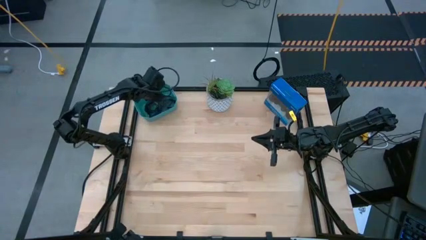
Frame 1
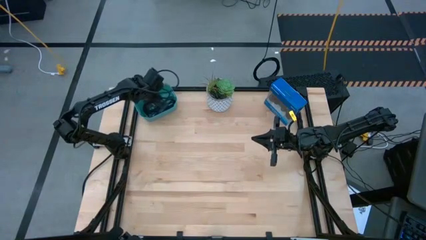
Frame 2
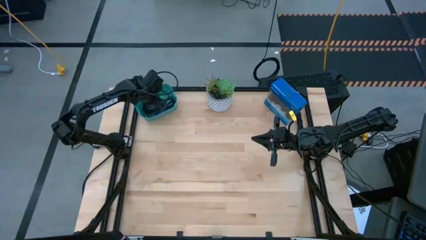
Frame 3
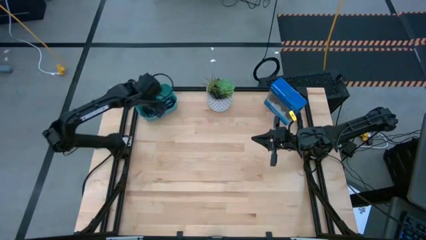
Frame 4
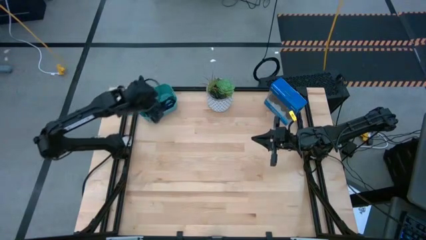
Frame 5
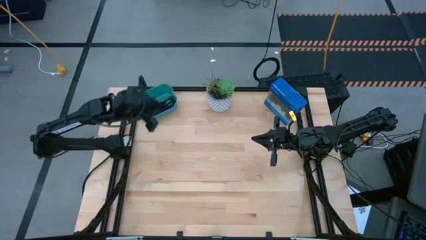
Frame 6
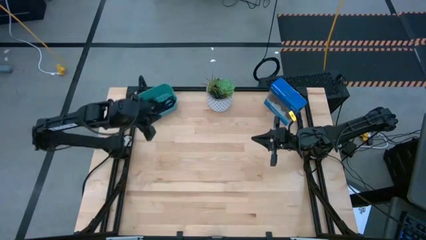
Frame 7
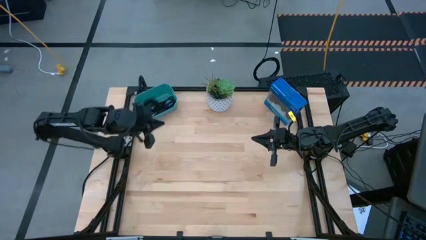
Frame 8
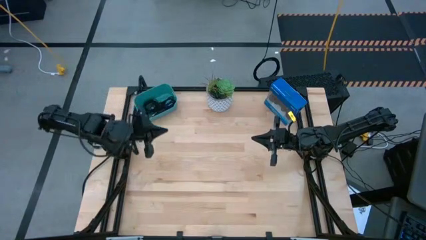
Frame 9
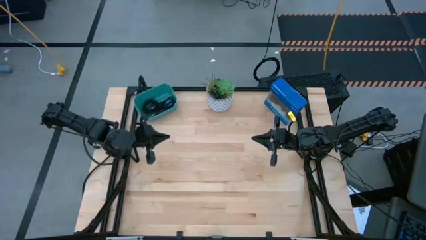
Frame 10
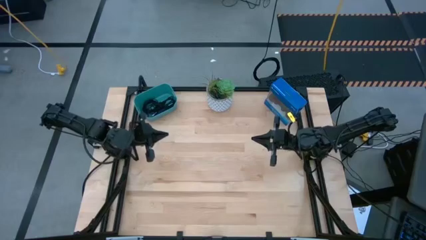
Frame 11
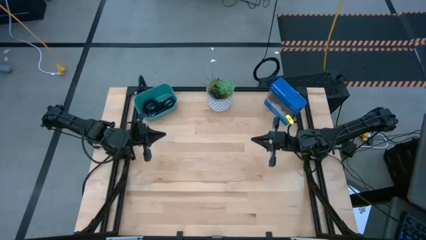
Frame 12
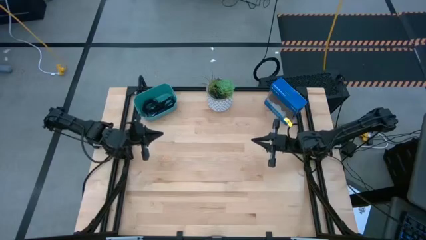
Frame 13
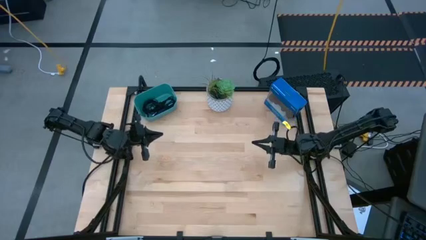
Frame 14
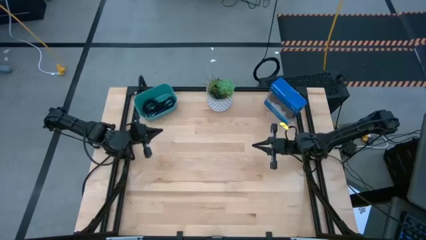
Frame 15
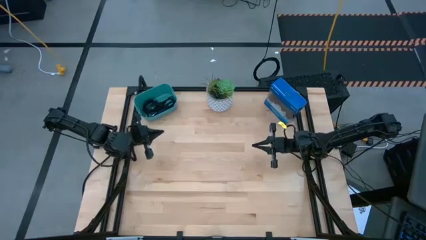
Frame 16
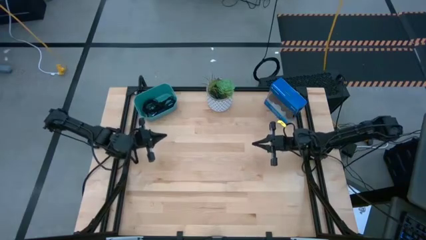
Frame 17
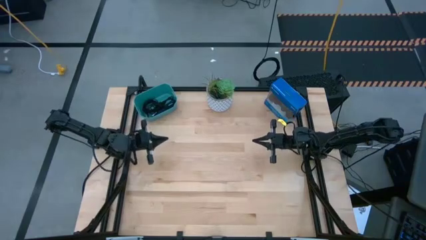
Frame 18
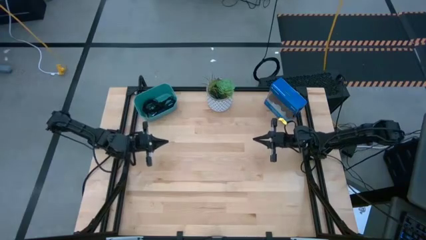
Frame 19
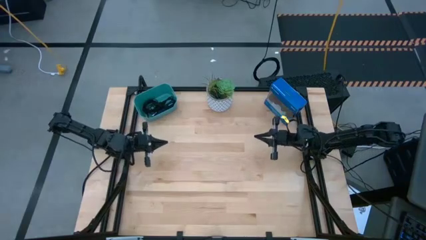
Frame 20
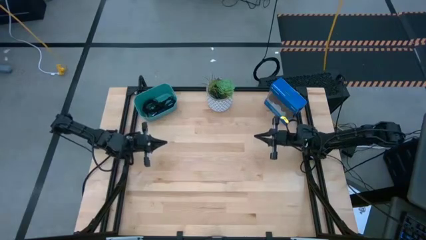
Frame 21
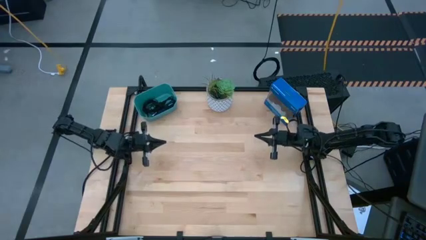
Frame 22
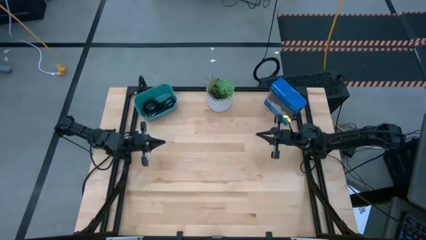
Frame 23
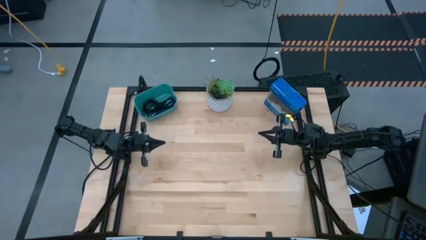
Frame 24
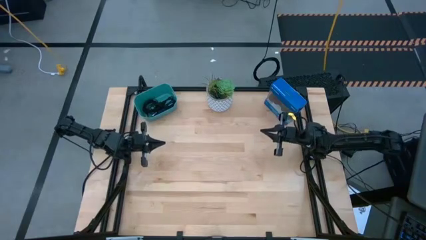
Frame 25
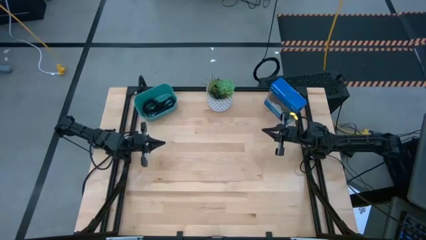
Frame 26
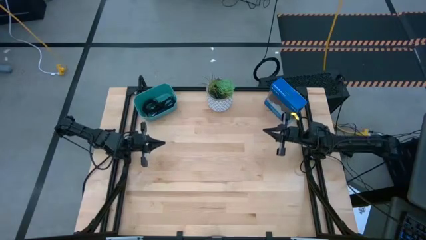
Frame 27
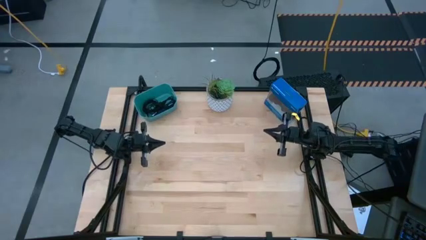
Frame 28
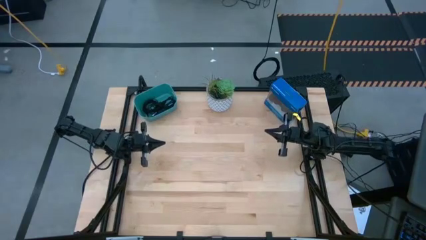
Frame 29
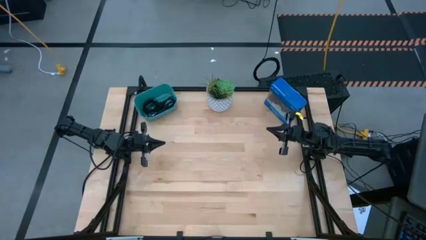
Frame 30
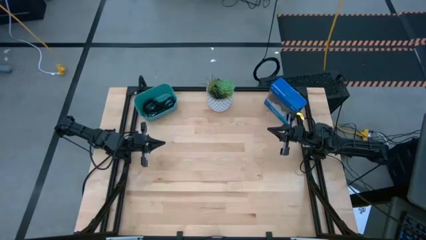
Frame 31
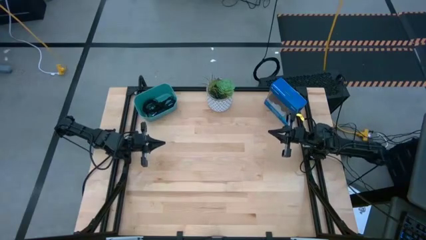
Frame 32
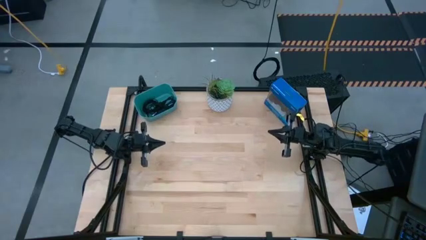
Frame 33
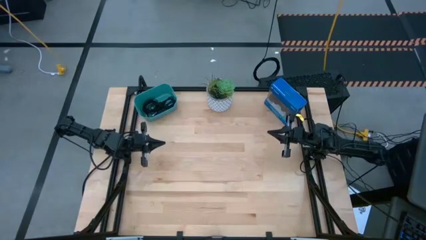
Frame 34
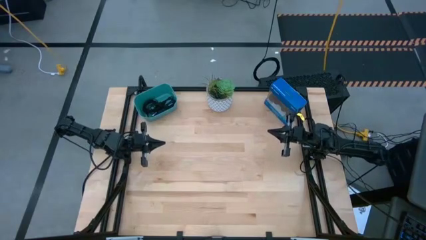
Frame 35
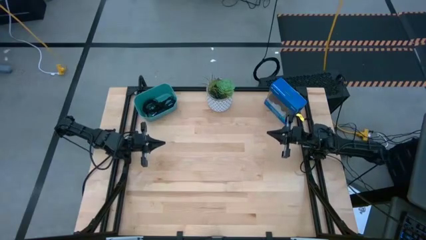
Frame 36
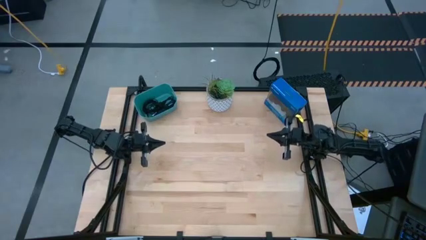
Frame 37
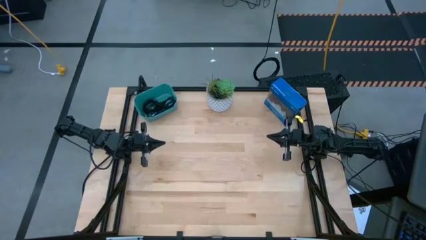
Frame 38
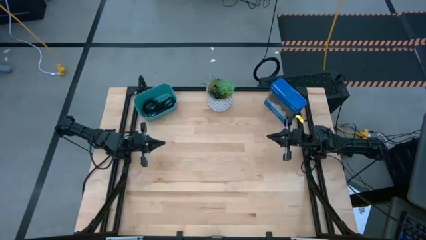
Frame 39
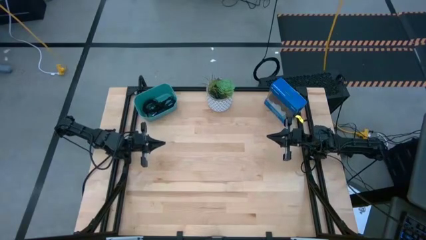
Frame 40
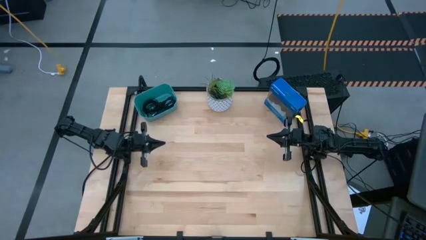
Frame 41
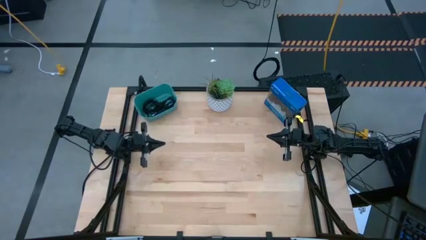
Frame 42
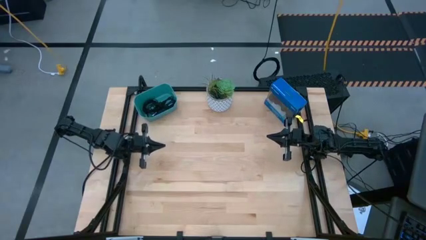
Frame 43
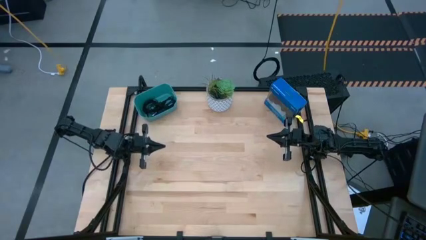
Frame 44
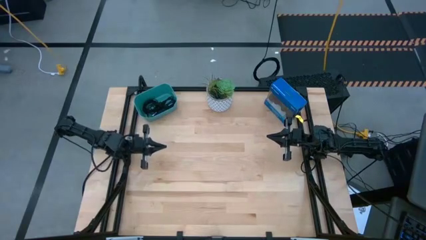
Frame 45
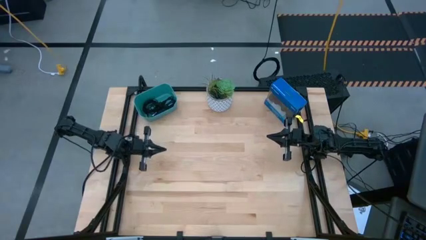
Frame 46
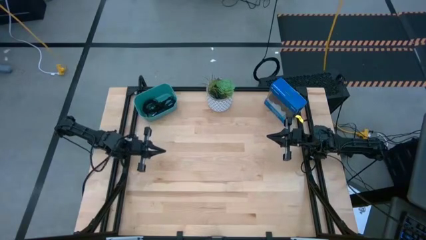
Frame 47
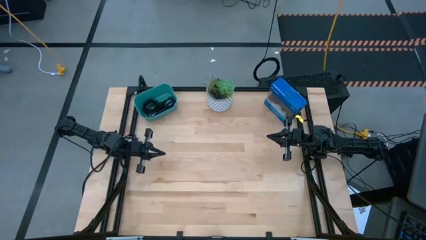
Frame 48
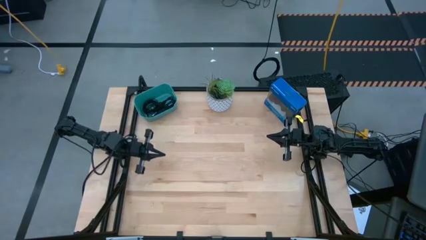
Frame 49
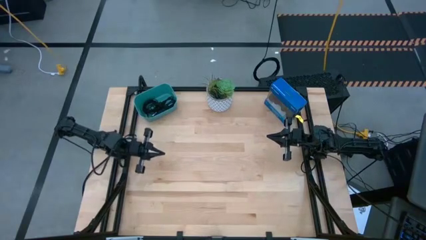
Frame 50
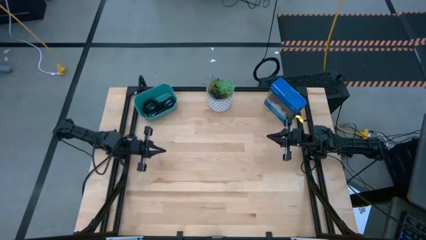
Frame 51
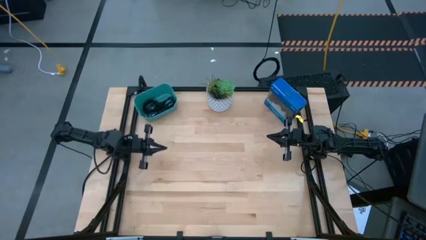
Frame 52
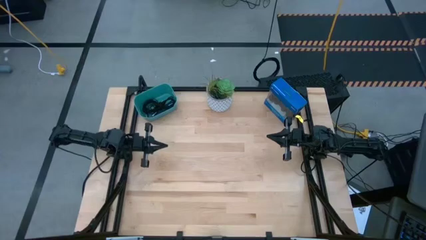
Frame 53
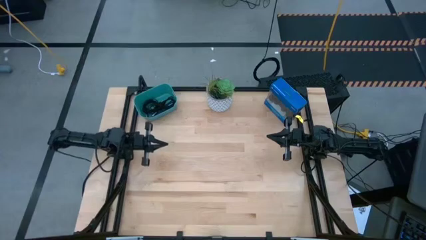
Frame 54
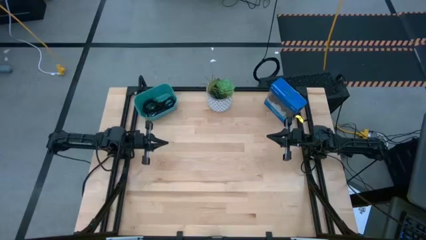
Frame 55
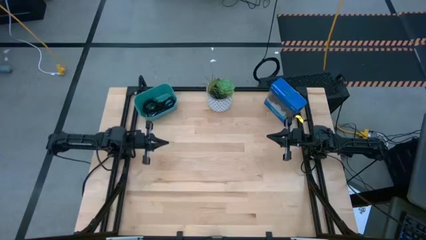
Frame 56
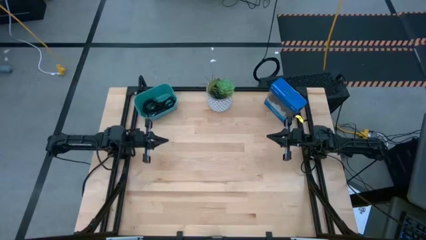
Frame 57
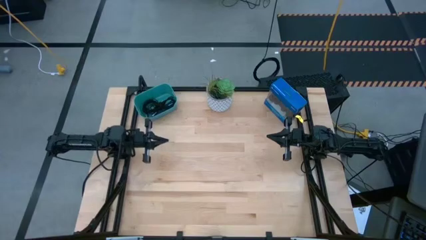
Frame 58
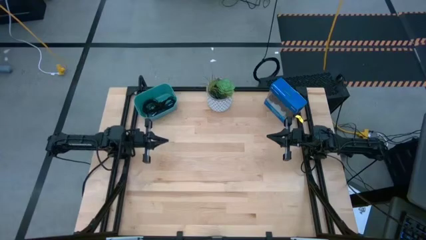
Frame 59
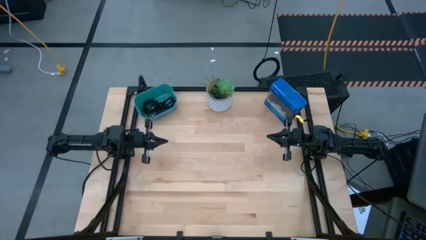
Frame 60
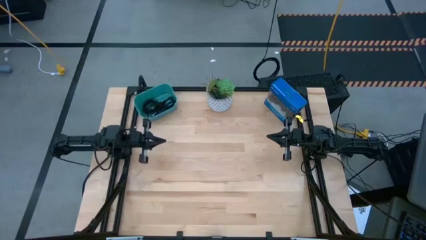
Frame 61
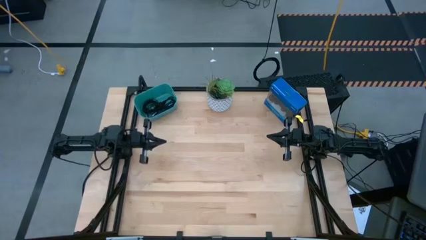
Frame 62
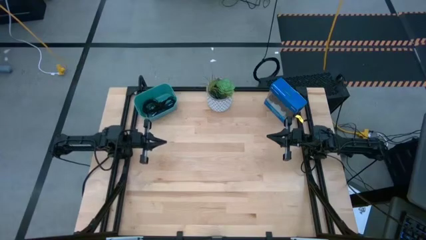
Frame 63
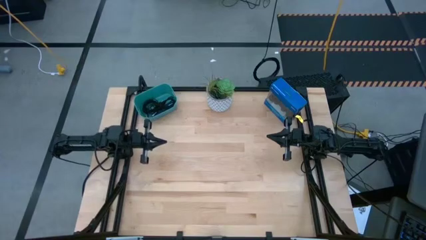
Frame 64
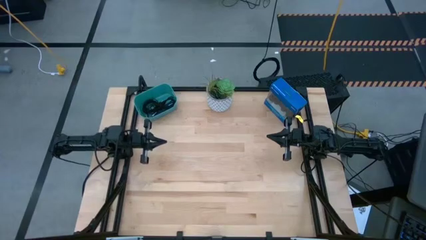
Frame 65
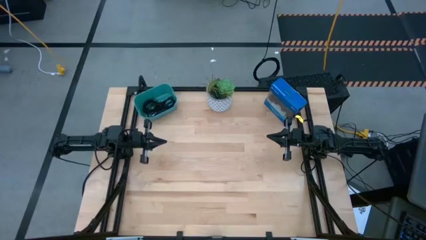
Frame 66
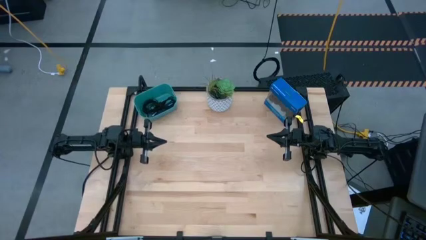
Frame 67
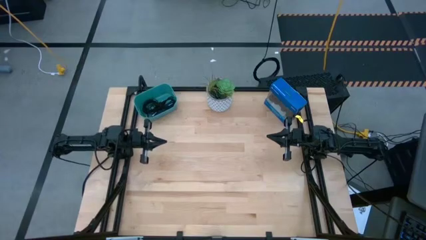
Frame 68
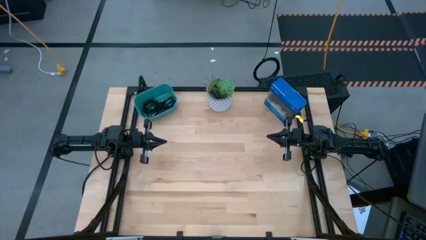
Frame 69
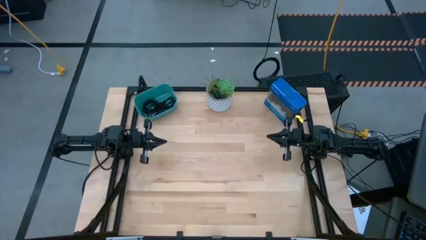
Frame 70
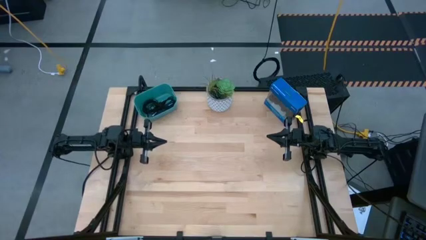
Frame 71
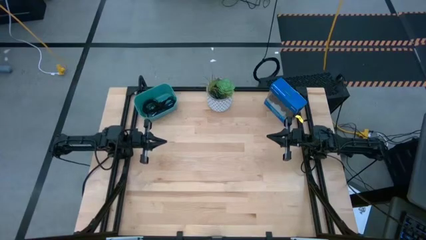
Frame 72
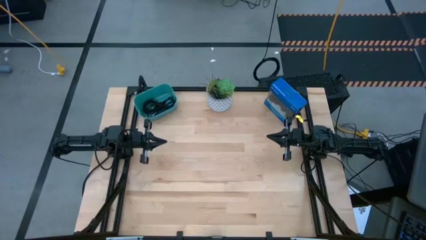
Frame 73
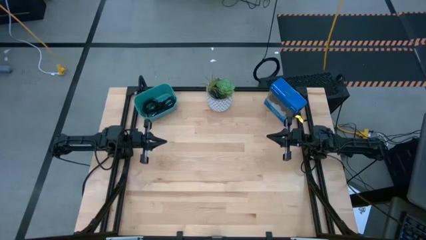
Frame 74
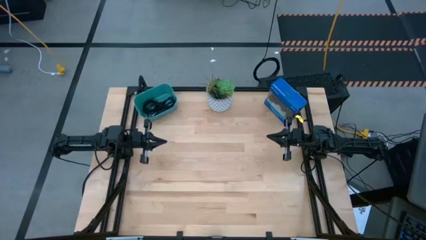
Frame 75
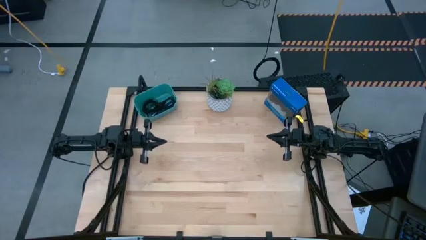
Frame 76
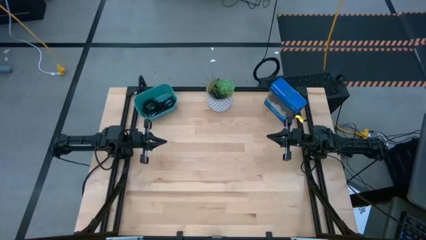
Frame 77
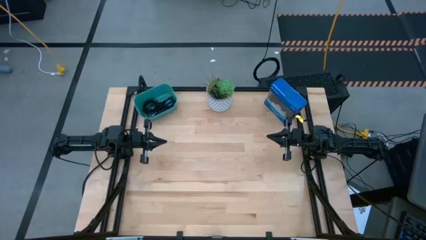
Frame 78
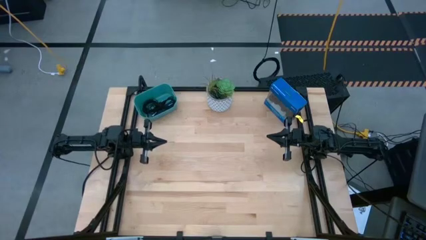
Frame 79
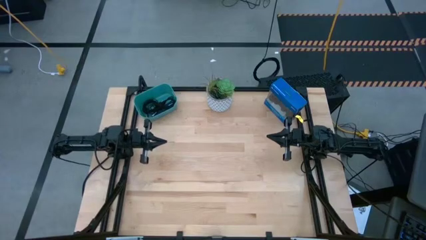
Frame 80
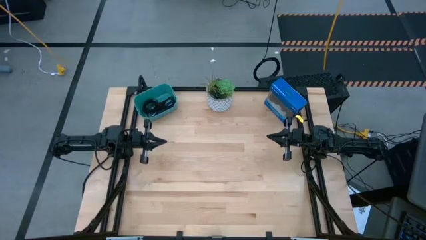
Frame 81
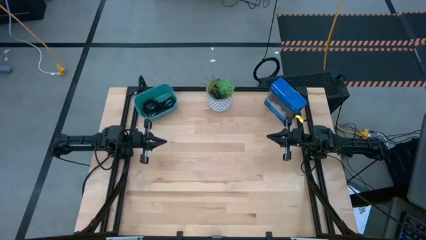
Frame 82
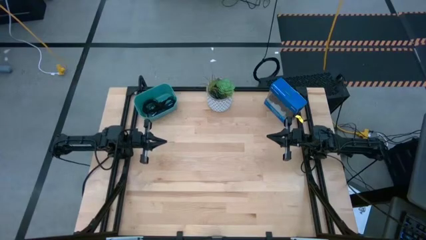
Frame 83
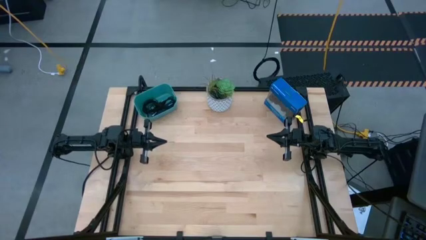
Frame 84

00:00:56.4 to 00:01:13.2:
Task: Pick and place USB-C Cables
Return to Home Position
